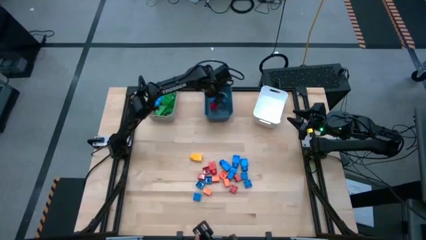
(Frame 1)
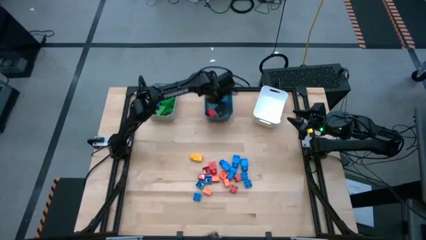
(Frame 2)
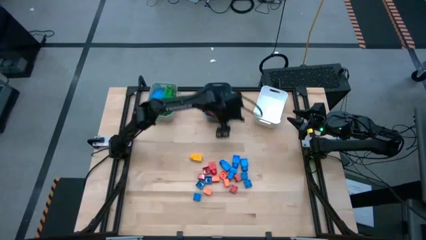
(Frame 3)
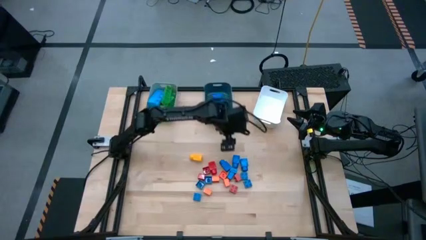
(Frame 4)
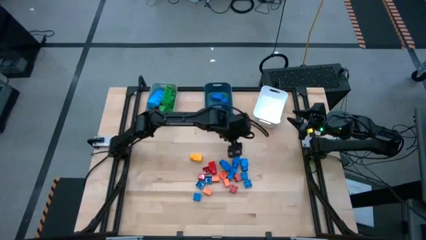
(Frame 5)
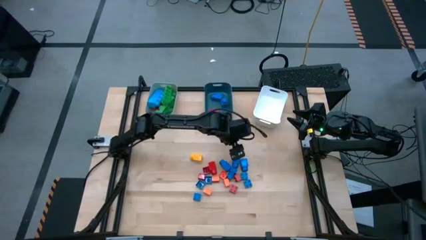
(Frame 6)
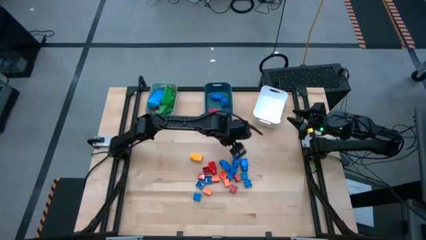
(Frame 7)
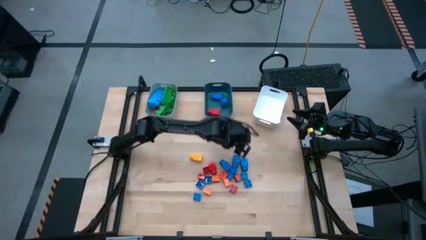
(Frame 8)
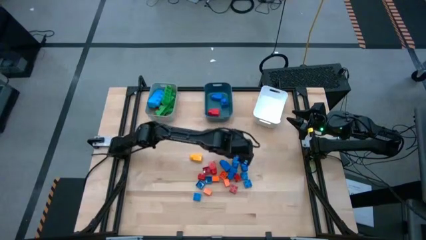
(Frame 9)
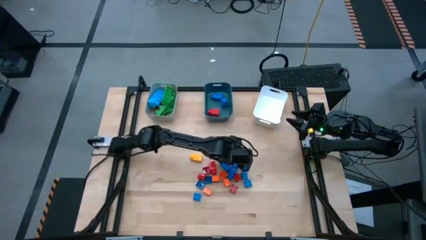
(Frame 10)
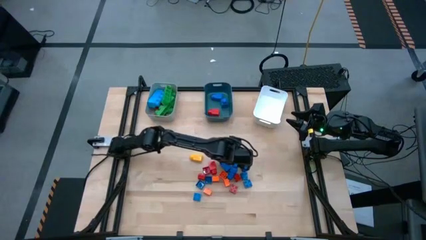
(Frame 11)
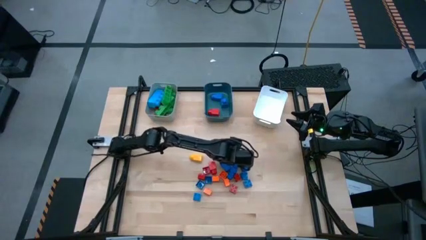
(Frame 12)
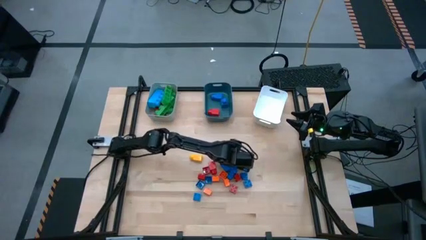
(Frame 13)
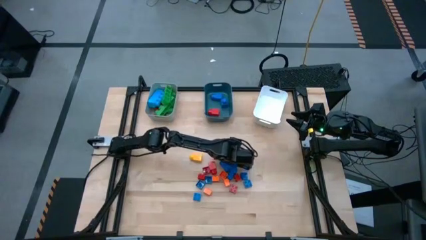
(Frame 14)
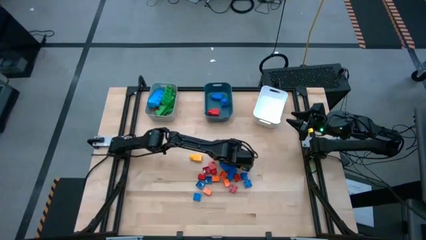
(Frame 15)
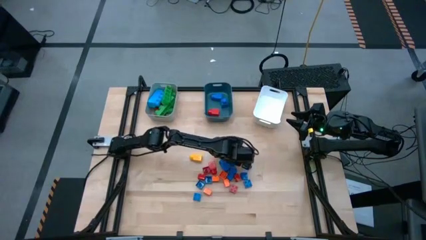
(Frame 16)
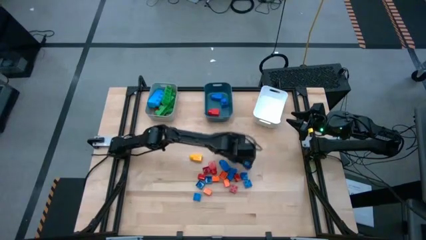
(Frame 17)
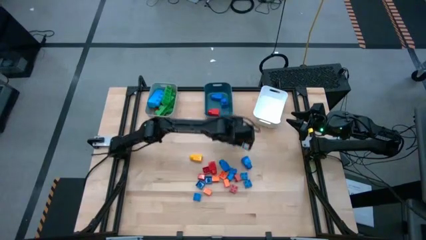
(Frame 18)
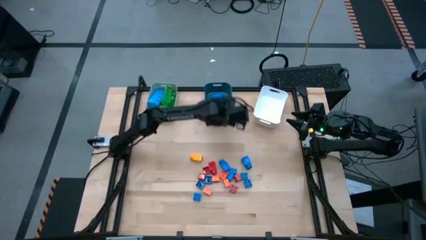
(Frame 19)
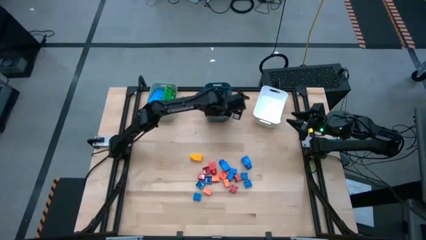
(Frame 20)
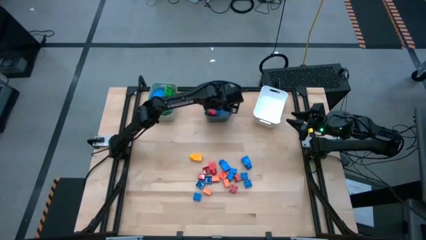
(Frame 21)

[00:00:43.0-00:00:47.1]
Task: Sort blocks by size
Put the blue 1 stud game piece into the blue bin

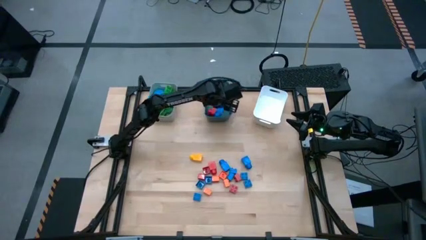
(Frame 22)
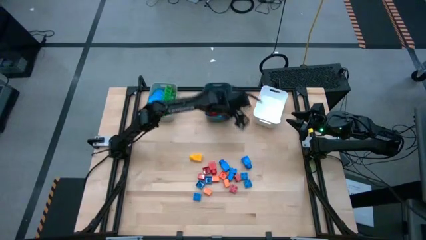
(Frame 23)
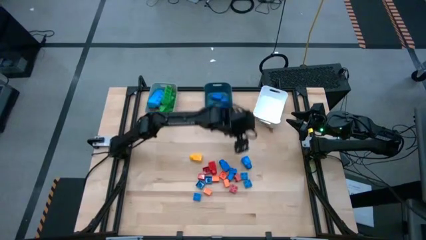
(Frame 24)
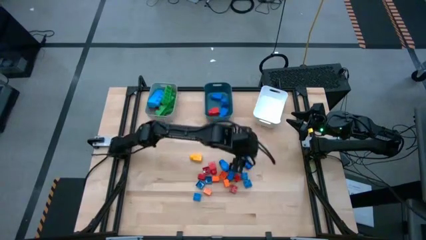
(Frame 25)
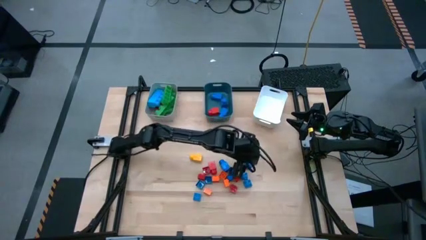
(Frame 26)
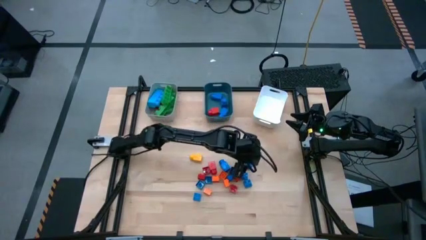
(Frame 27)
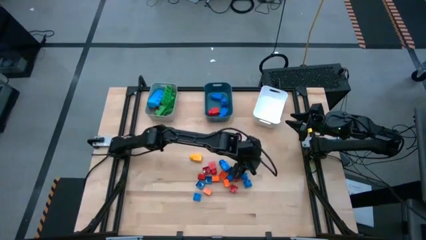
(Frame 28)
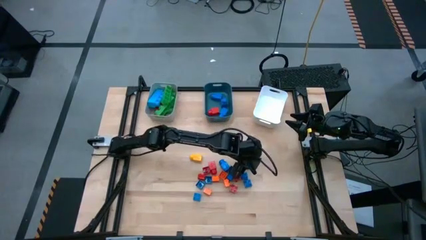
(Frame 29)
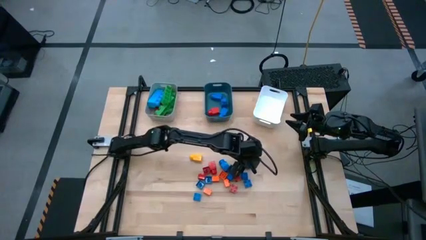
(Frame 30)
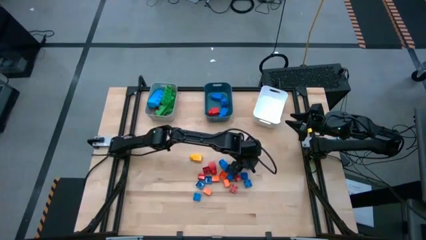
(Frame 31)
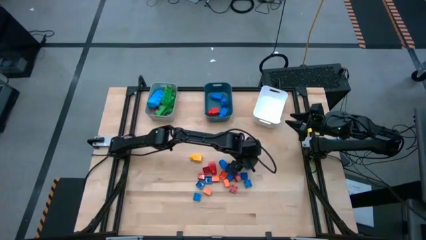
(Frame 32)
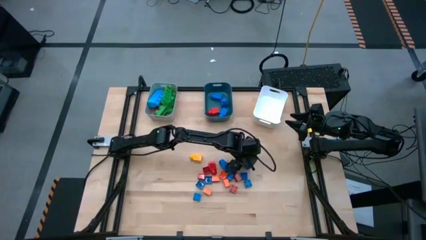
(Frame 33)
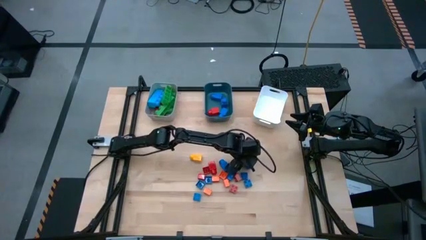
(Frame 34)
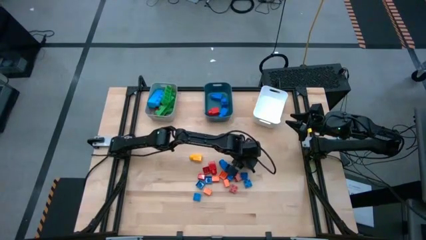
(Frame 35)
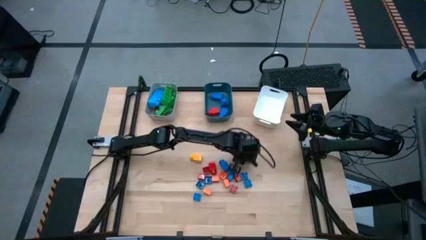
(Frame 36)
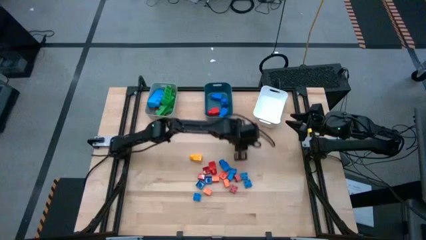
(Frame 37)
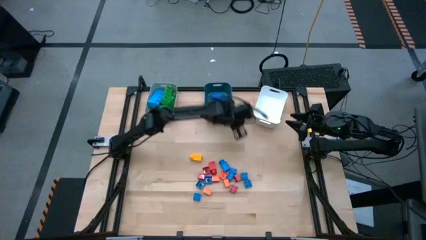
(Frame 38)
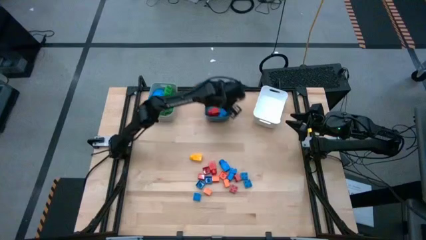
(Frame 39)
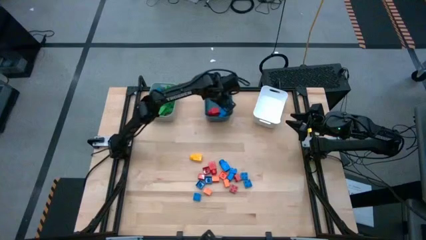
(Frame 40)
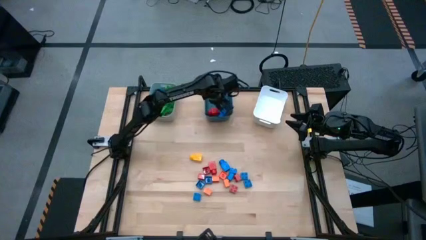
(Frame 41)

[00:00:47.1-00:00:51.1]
Put the blue 1 stud game piece into the blue bin

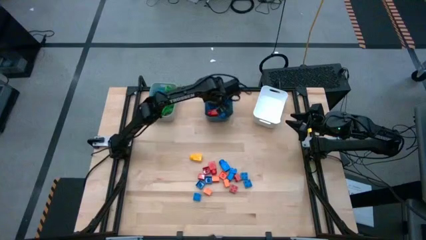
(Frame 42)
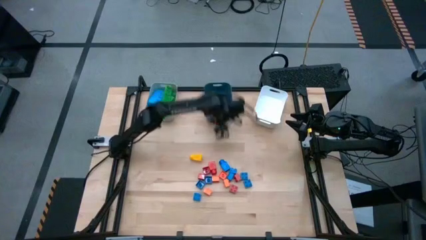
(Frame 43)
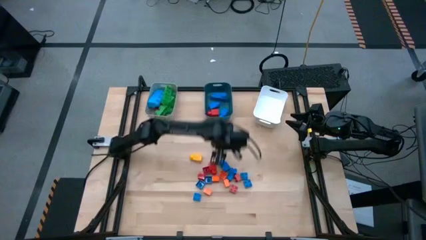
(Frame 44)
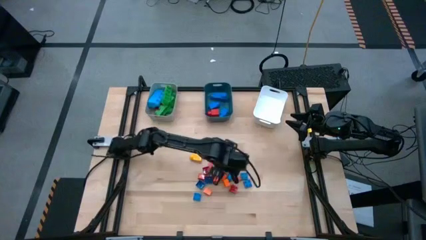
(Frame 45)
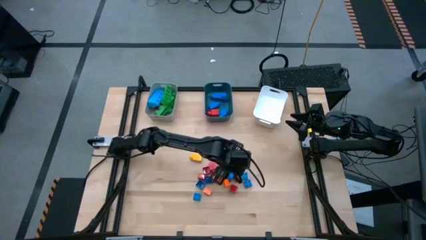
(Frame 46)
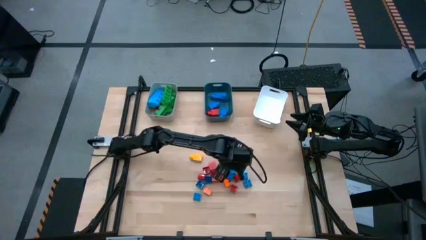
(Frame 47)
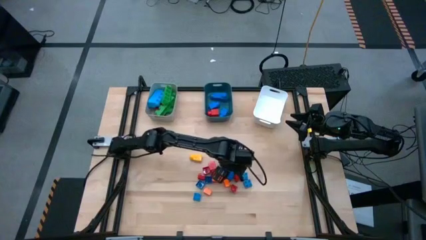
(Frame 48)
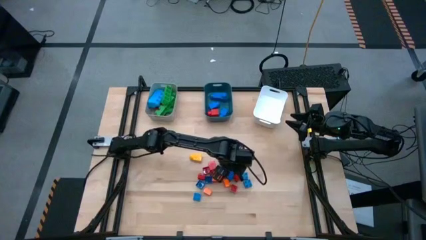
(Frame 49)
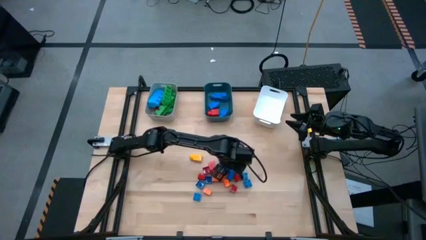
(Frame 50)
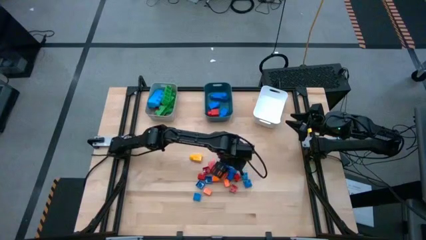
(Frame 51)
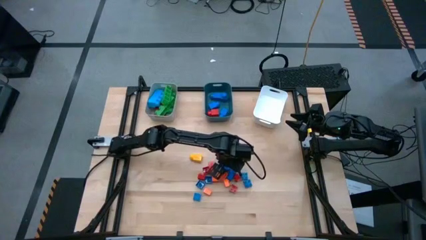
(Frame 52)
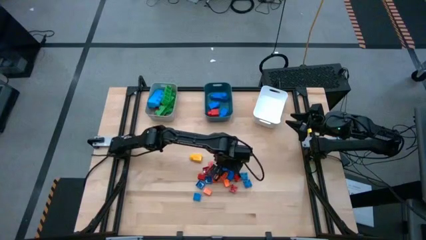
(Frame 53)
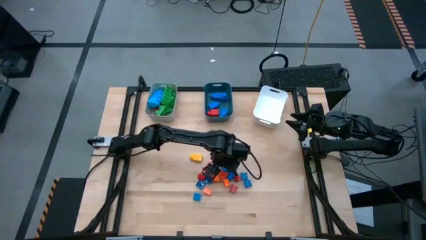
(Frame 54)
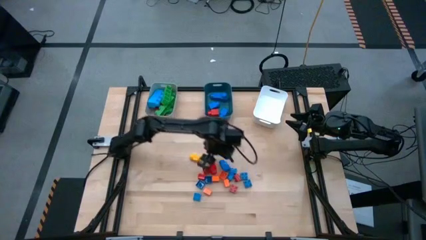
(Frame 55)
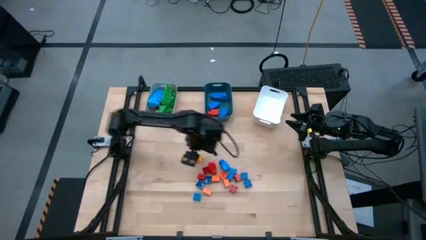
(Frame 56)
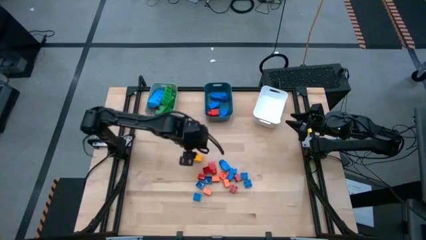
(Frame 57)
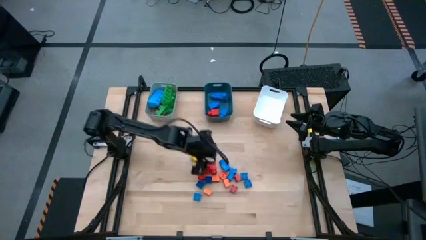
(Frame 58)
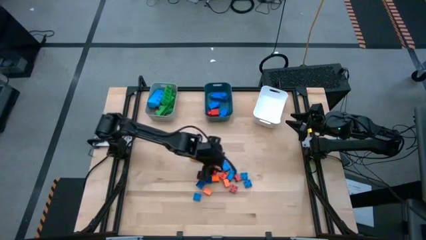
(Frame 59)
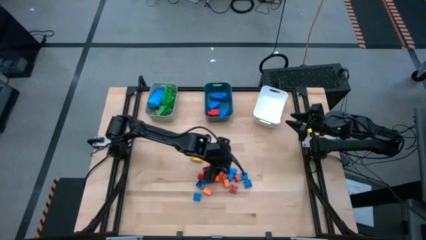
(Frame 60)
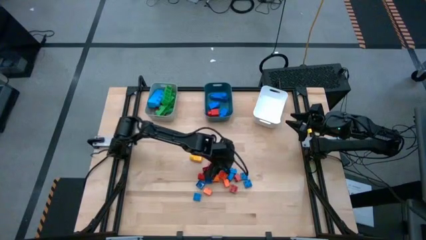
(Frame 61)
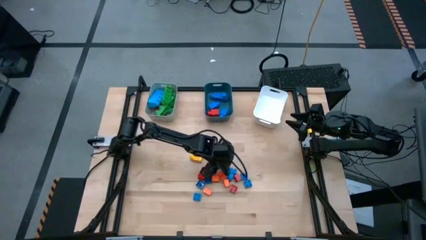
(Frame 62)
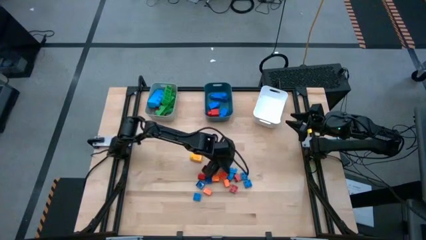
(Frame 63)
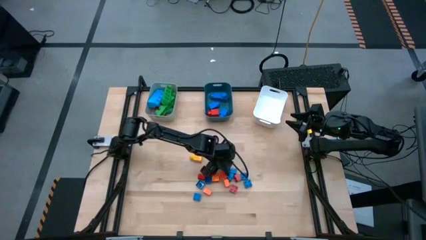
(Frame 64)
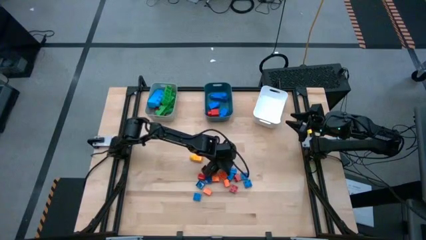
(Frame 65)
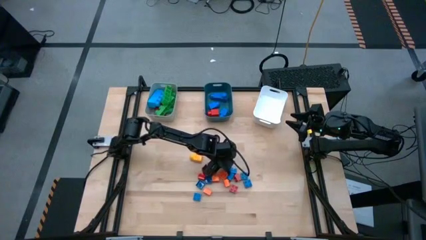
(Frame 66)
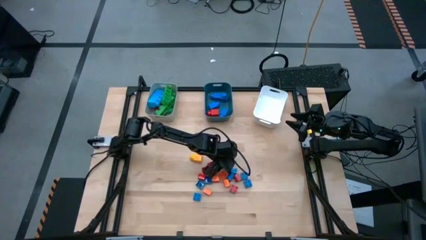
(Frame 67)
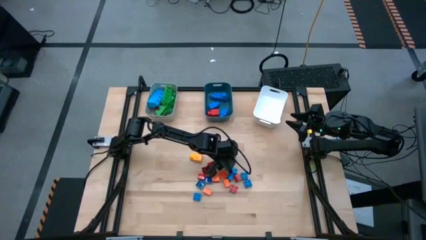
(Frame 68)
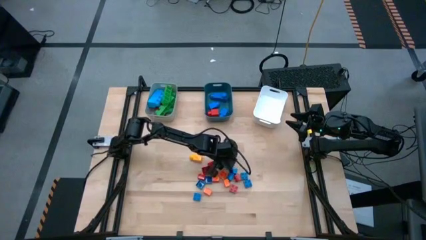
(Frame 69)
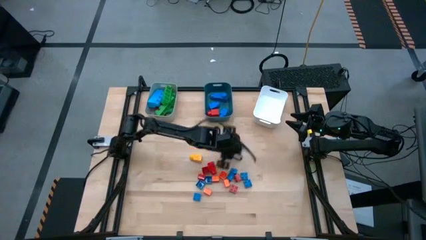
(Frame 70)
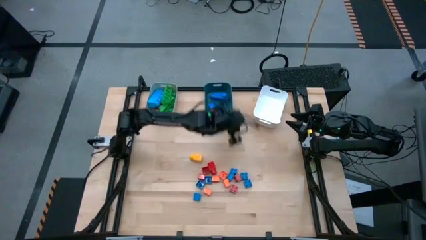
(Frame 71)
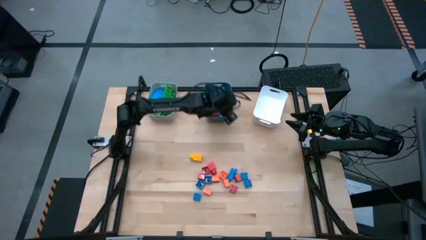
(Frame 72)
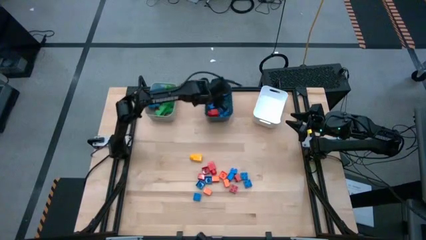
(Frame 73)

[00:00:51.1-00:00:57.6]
Put the blue 1 stud game piece into the blue bin

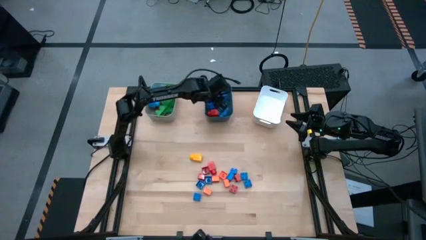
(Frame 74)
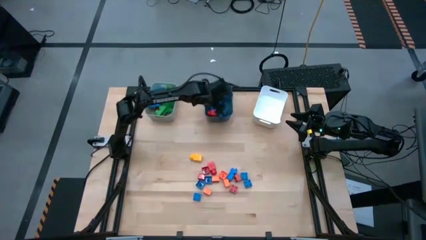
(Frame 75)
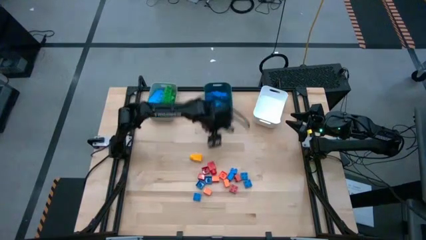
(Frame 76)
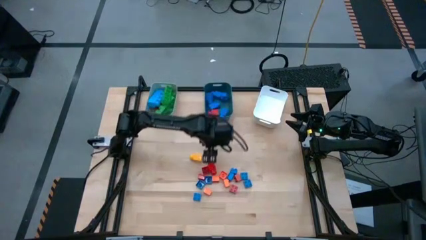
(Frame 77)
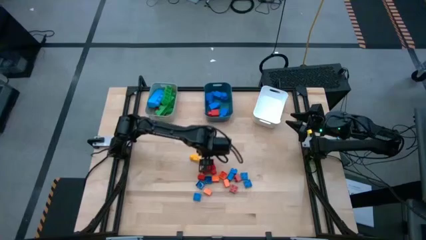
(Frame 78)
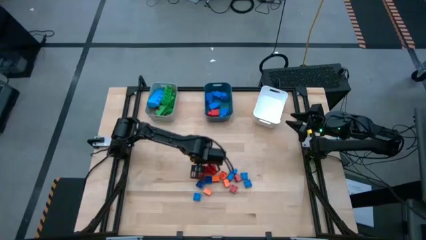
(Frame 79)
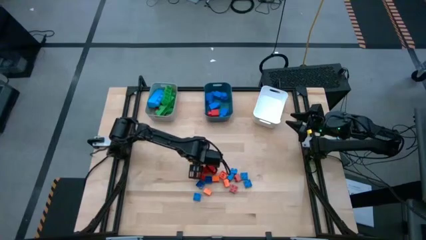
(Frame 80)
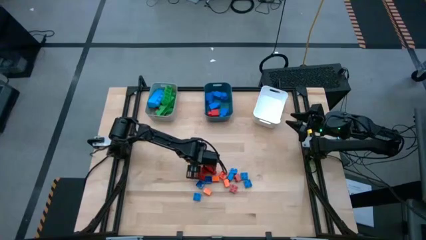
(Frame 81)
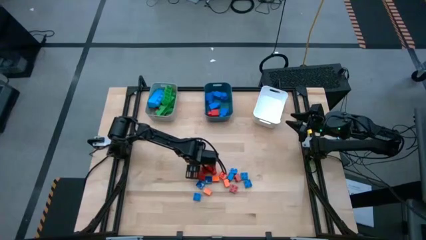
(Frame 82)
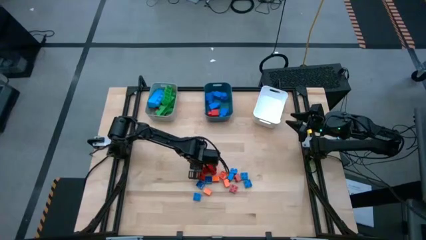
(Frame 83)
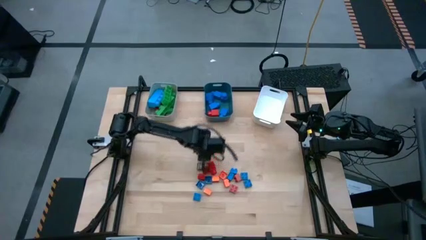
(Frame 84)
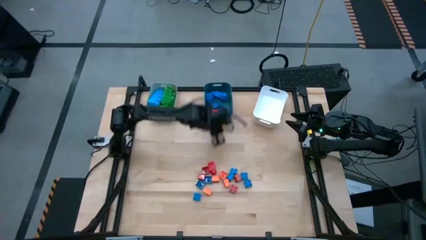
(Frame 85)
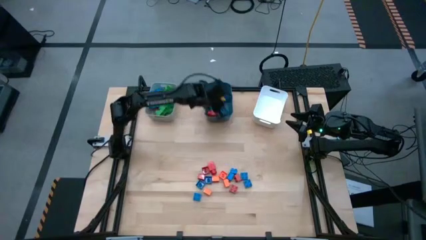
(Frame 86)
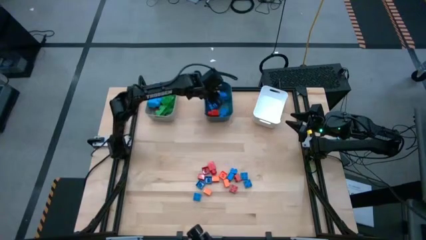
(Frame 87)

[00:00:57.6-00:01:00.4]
Put the yellow 1 stud game piece into the blue bin
